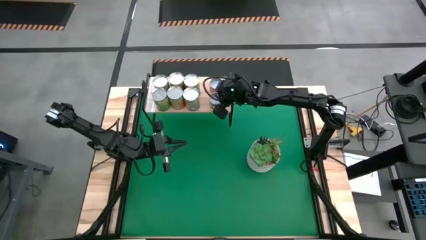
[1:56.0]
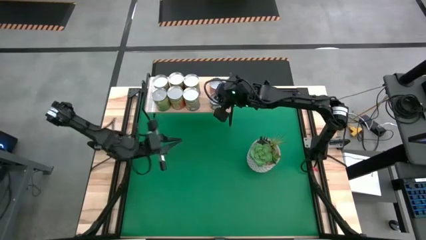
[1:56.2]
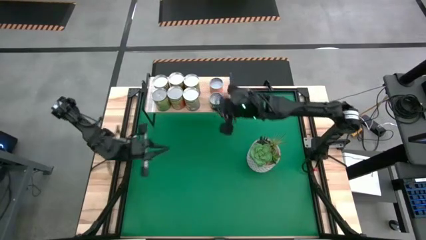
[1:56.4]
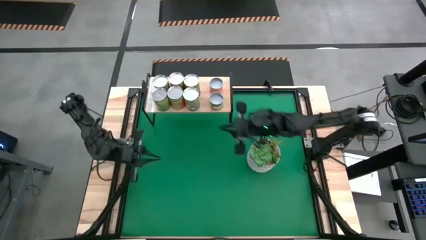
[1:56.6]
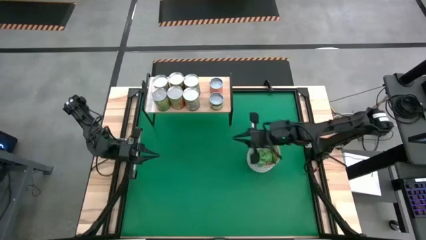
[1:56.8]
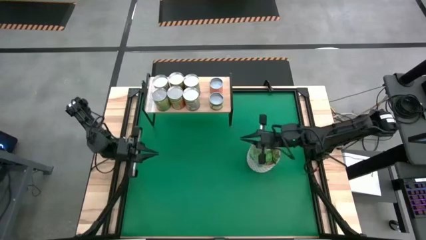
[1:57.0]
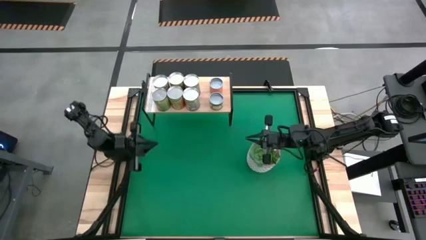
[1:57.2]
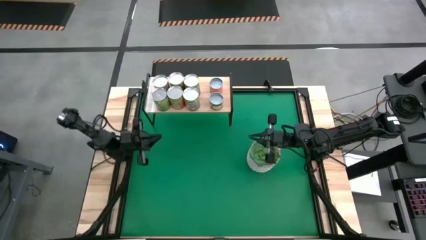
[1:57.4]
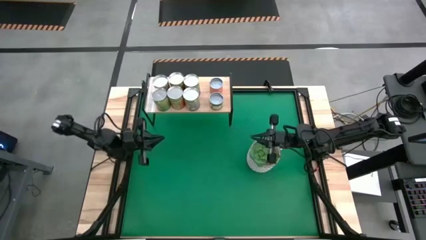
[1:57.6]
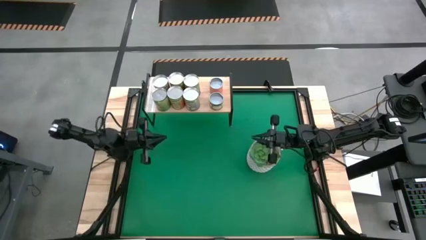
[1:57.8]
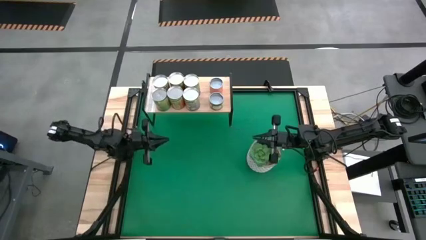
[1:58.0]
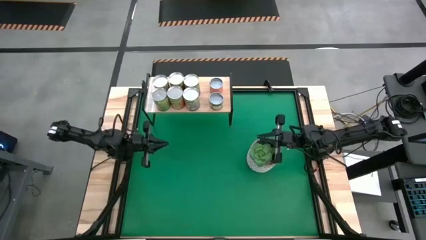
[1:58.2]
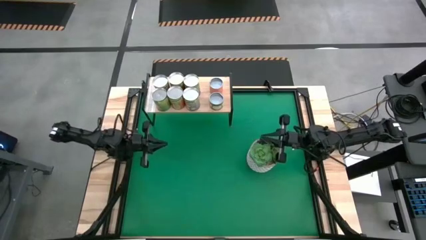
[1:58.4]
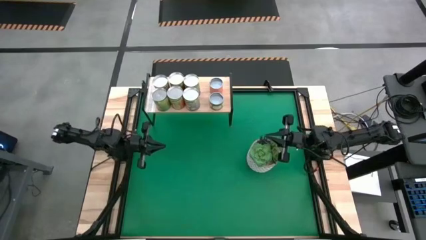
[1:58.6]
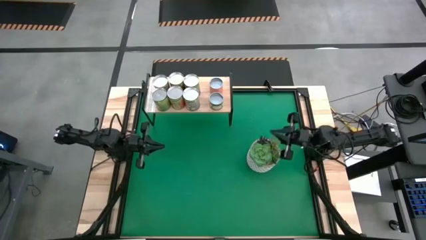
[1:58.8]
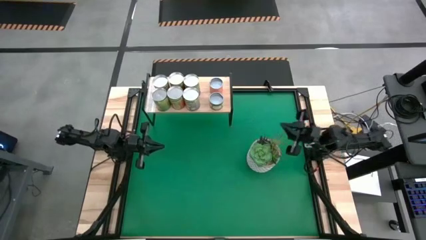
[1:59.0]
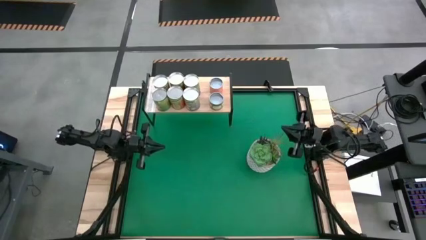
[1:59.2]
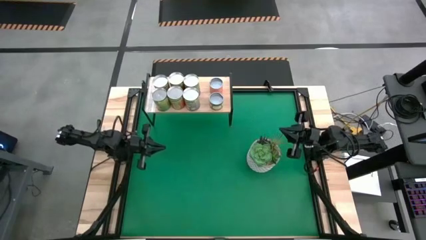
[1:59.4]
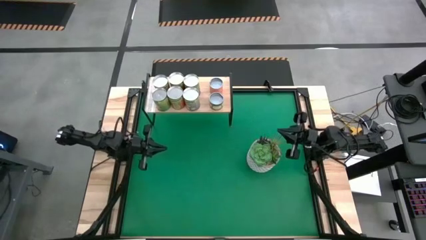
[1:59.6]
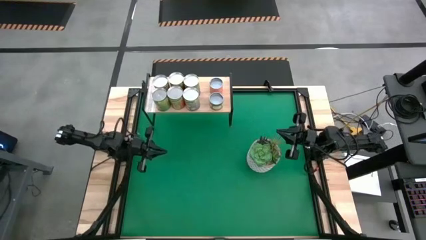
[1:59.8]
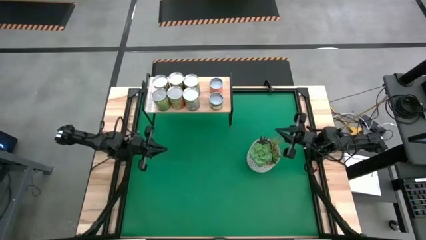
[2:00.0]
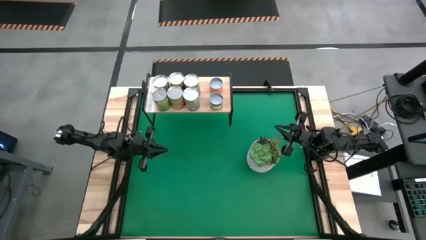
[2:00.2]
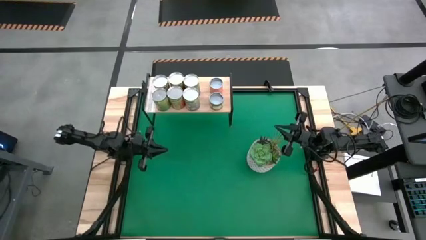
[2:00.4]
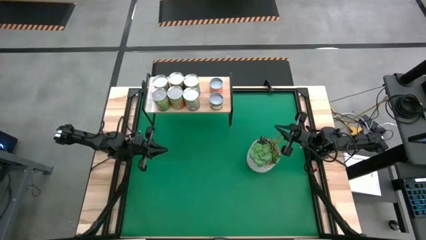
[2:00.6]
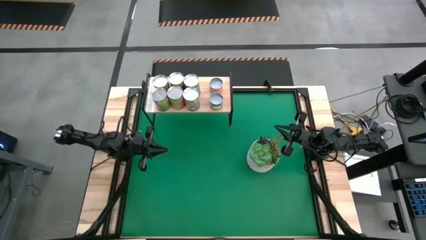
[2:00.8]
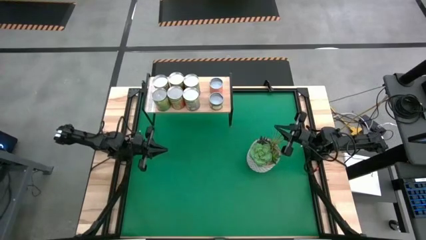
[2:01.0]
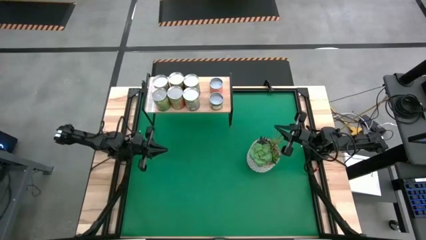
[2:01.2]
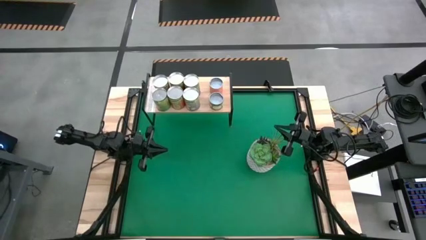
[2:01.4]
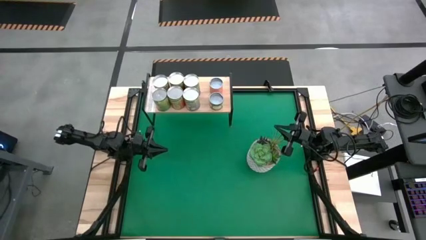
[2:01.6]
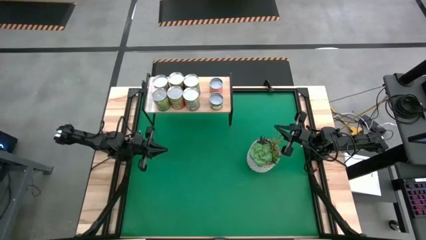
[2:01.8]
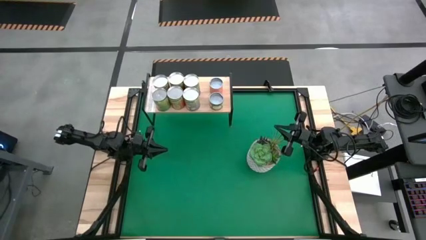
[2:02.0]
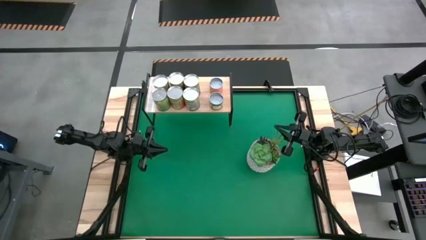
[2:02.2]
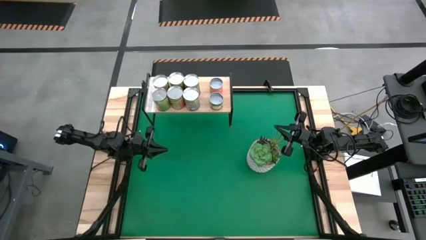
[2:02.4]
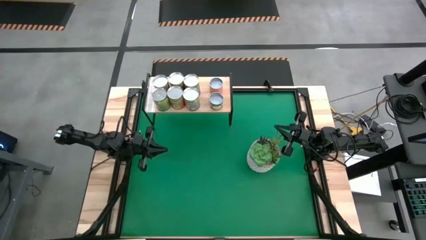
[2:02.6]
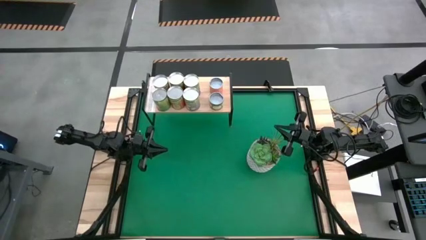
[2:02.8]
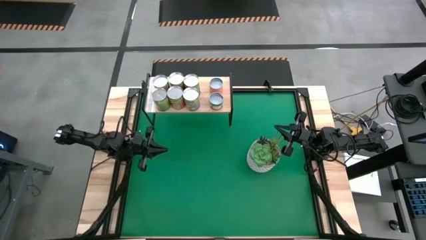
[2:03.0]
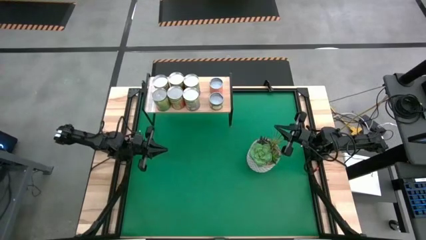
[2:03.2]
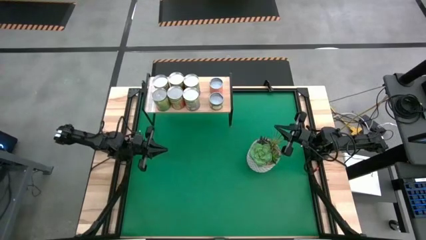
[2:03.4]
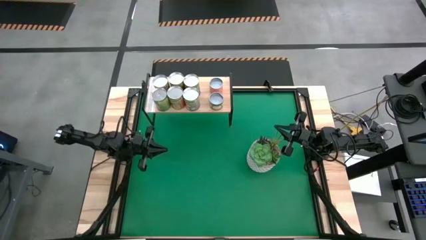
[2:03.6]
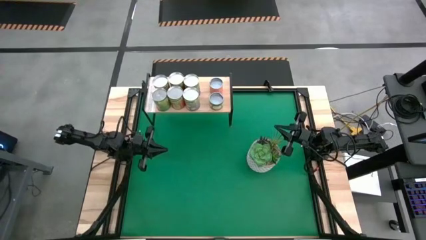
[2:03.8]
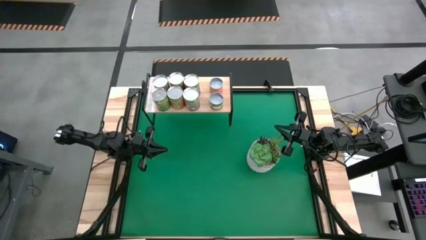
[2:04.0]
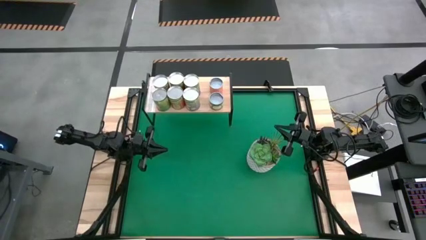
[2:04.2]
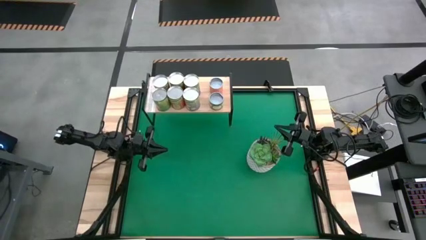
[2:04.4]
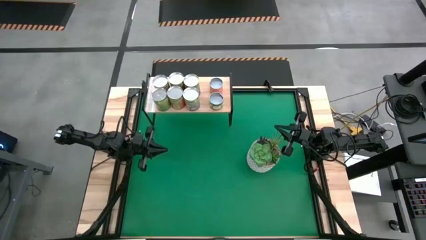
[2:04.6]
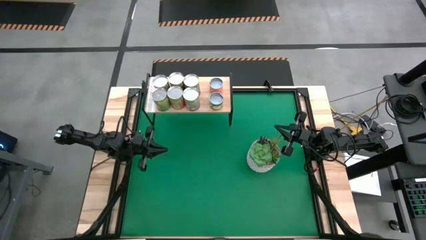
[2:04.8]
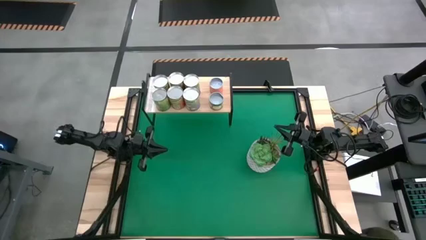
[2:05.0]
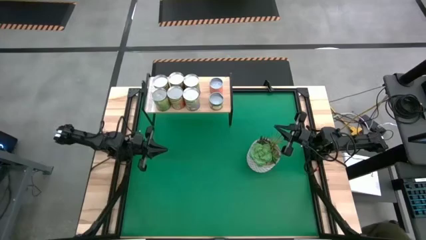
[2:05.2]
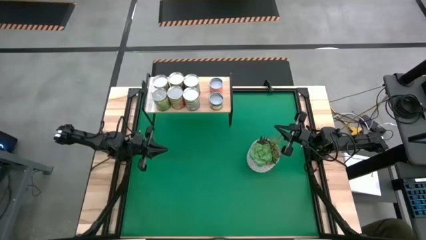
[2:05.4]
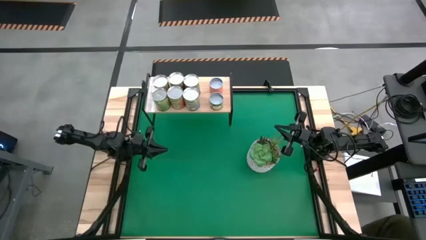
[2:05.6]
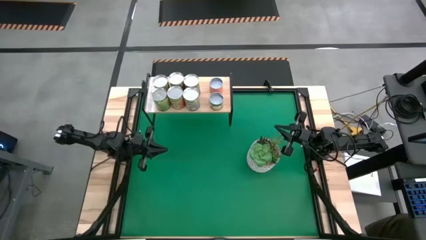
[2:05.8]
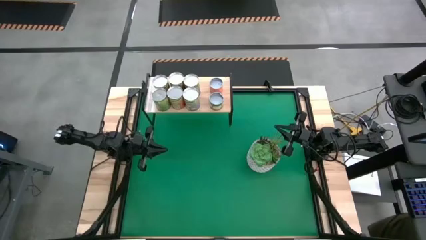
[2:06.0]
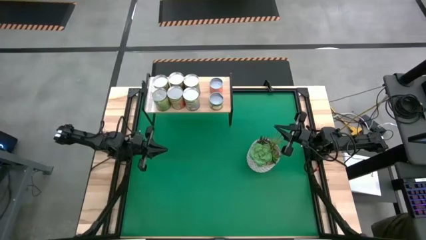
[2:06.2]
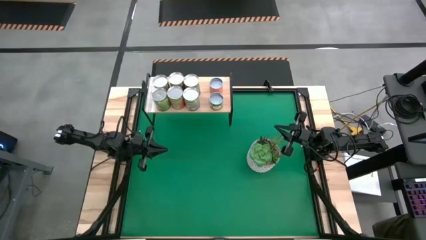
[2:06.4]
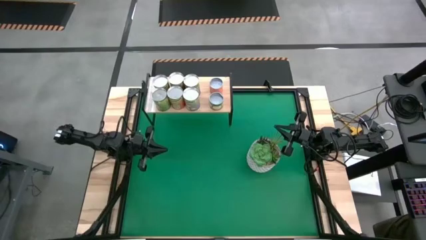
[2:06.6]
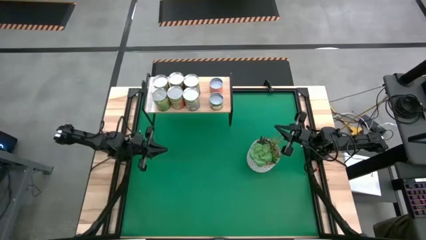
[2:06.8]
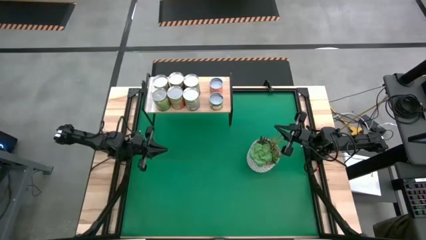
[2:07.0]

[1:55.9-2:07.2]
Task: Pick and place cans onto a shelf
Return to Home Position

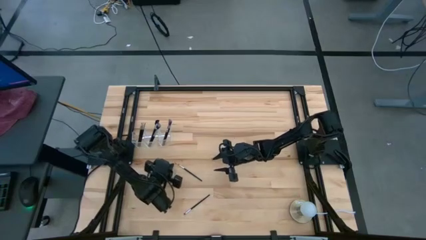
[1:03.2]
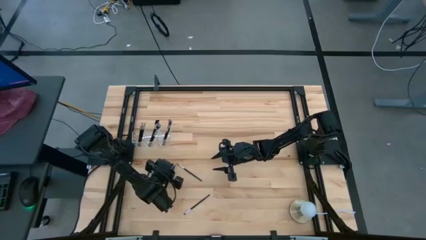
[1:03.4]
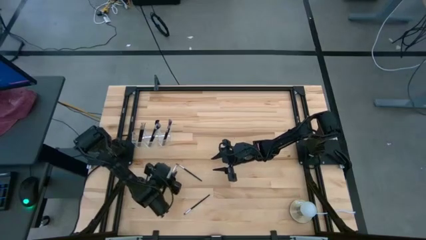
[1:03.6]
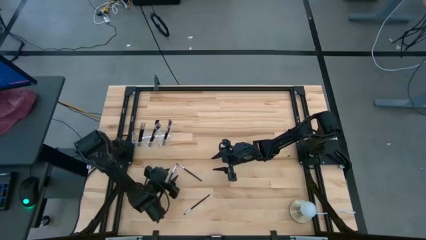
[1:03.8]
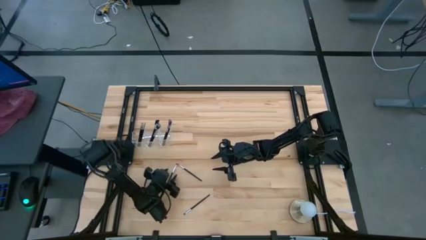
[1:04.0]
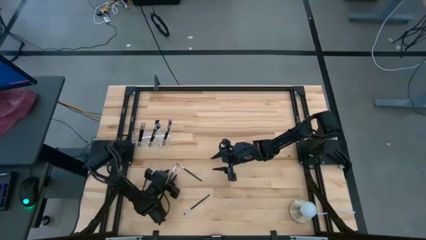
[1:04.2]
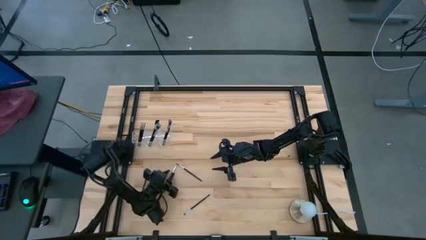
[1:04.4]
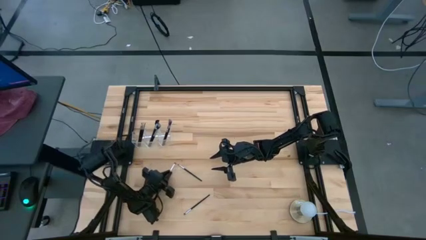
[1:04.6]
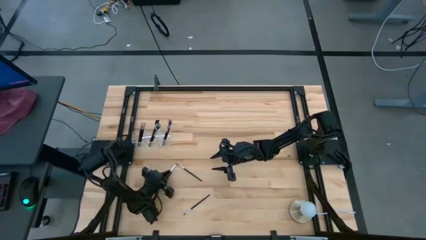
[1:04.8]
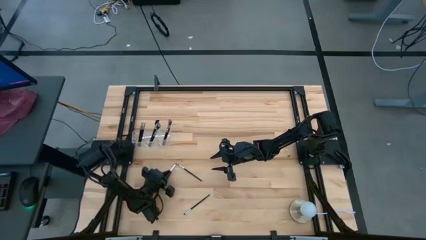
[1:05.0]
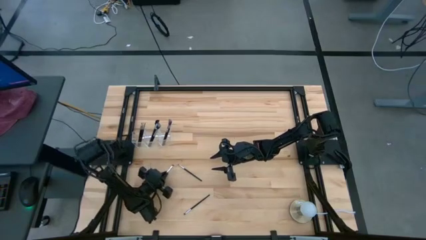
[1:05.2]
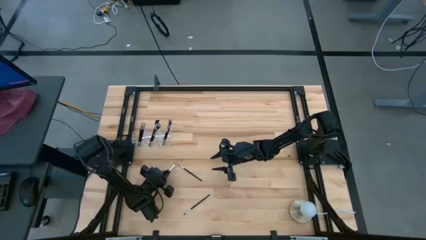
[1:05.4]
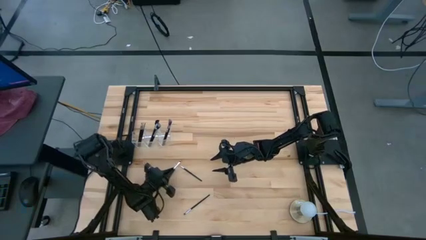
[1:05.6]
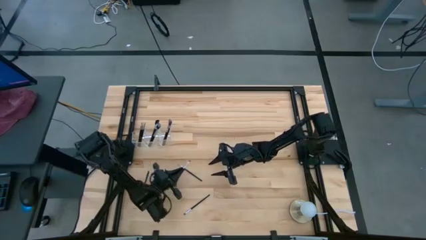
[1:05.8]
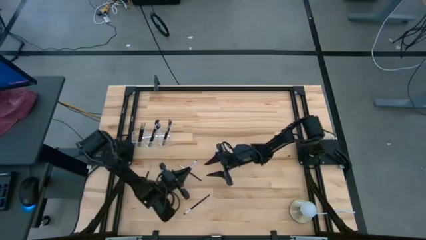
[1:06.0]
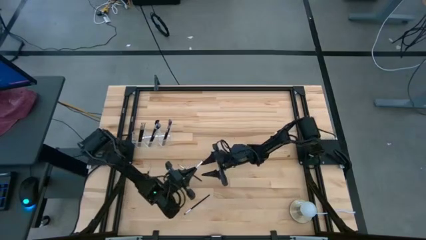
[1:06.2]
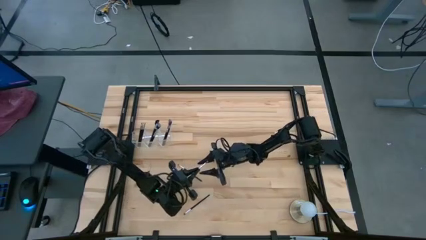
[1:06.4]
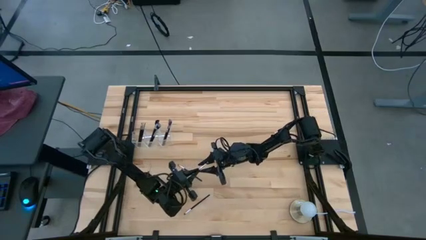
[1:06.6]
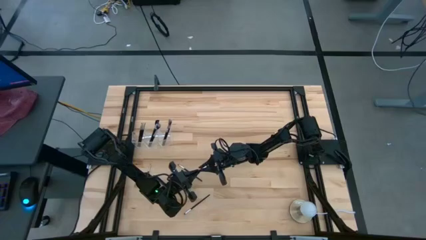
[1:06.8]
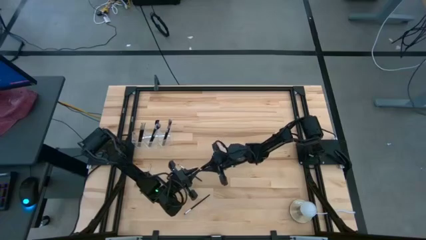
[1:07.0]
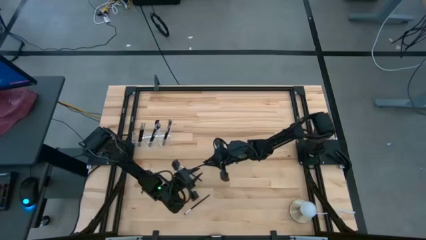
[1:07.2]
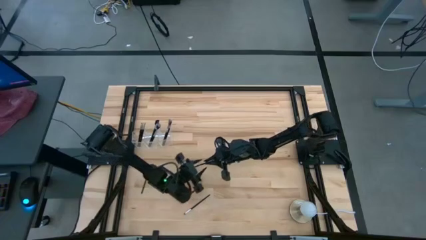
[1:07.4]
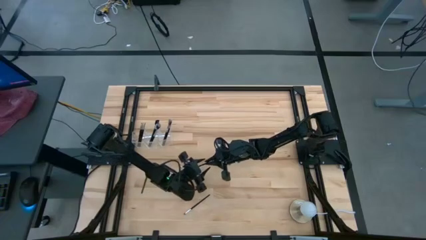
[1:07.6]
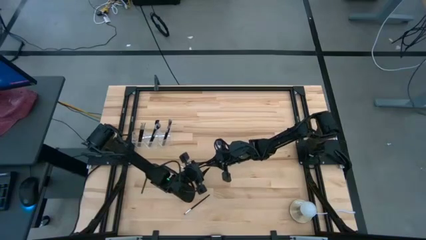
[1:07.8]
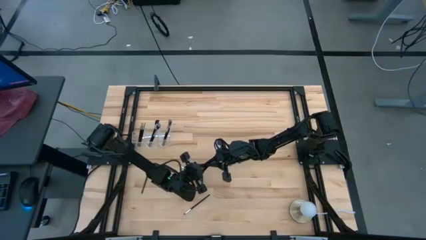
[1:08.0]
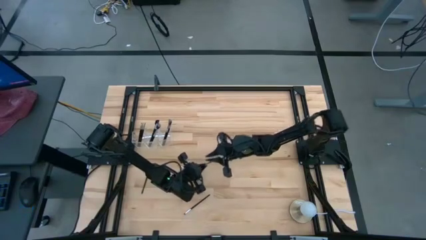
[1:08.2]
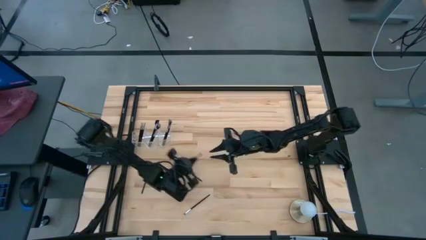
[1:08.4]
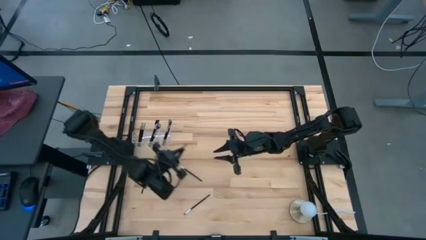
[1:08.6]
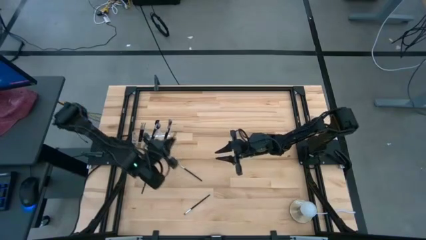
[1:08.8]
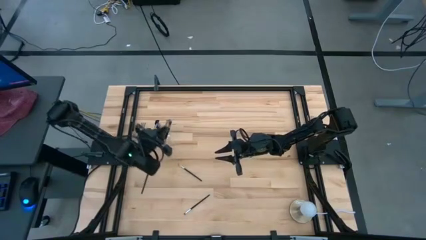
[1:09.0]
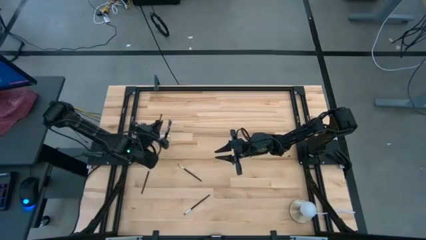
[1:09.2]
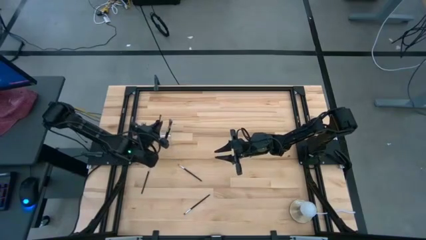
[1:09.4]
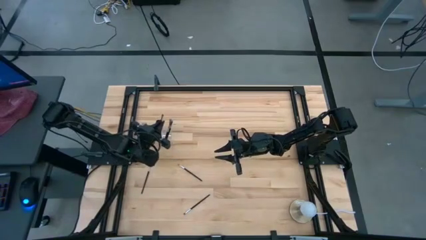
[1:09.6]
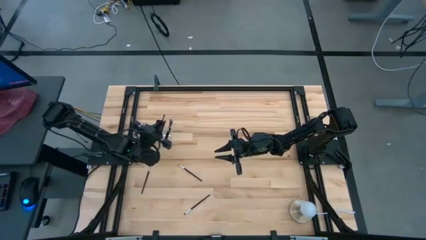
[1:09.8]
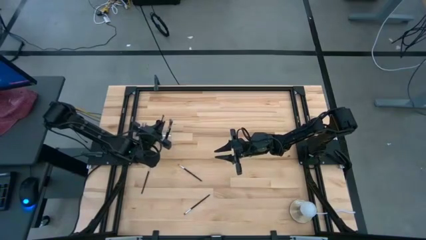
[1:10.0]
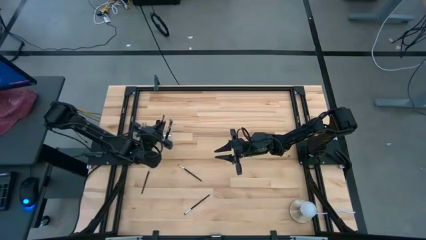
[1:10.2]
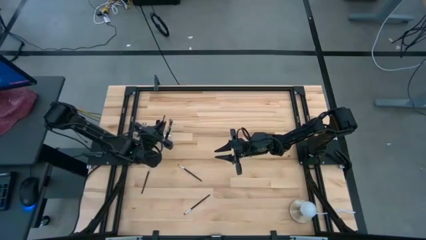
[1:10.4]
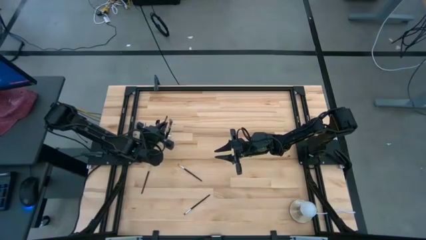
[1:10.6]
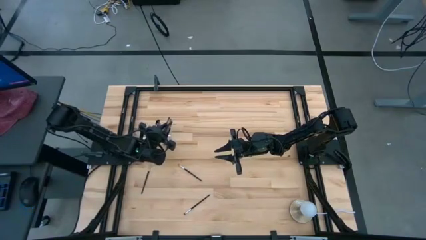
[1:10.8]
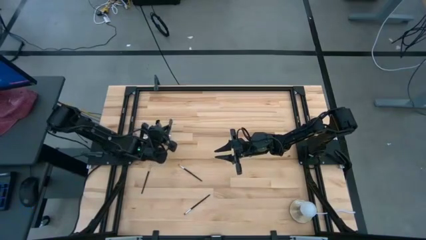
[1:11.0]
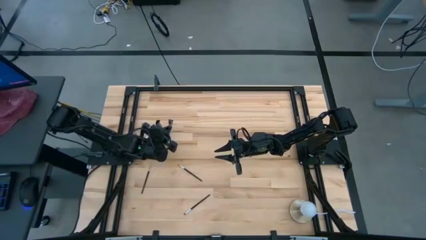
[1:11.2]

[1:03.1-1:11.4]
Task: Put items in baskets/containers
Put the black eyeshadow brush into the transparent organizer
